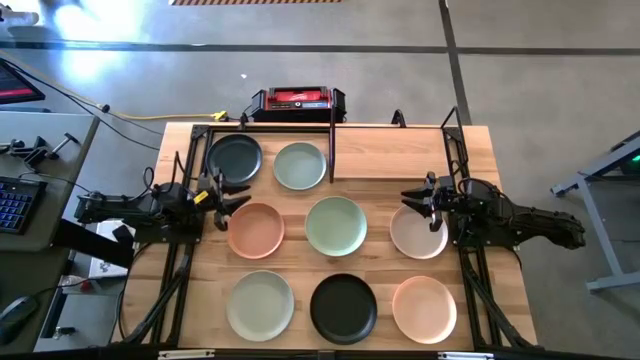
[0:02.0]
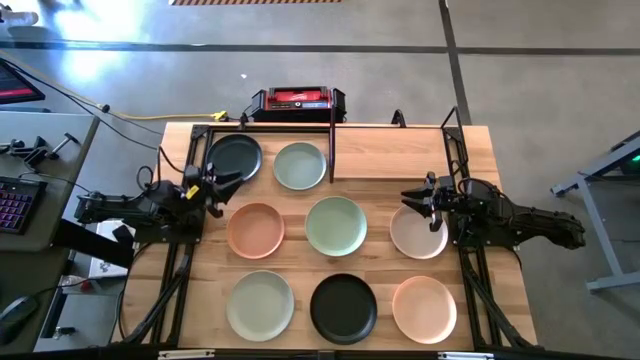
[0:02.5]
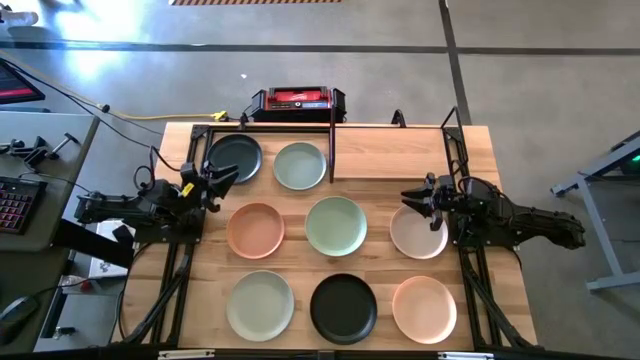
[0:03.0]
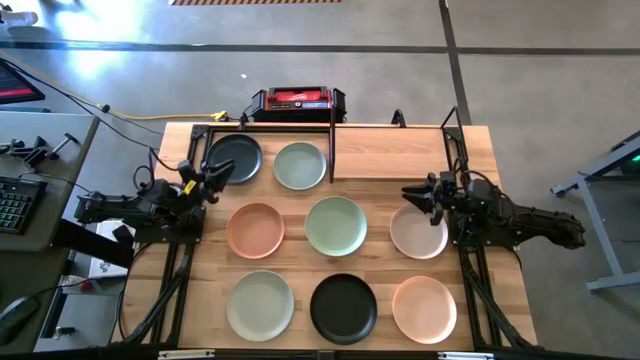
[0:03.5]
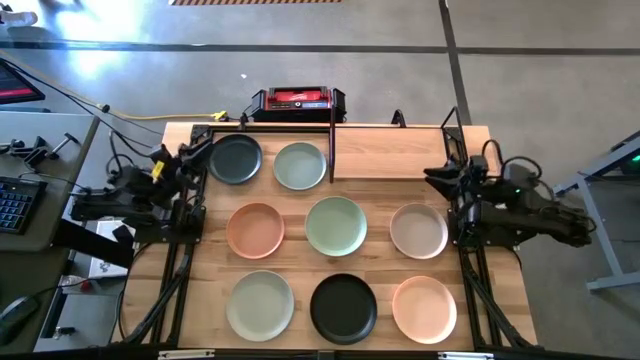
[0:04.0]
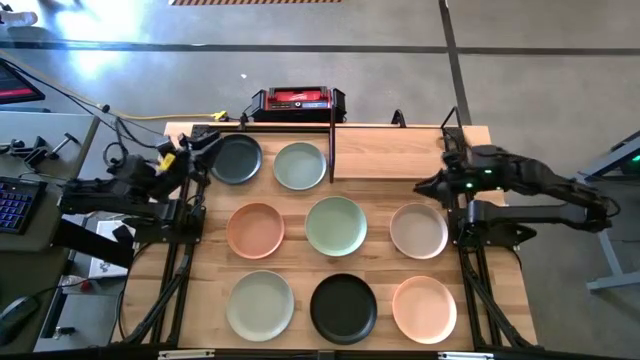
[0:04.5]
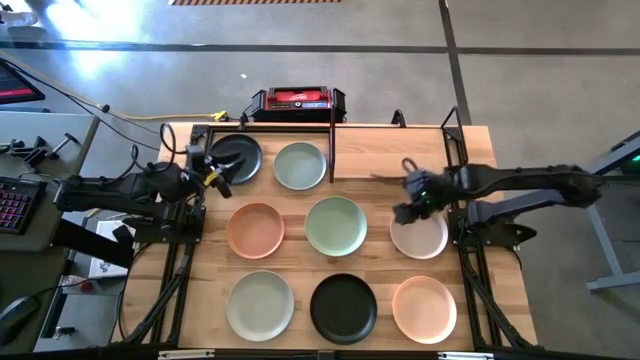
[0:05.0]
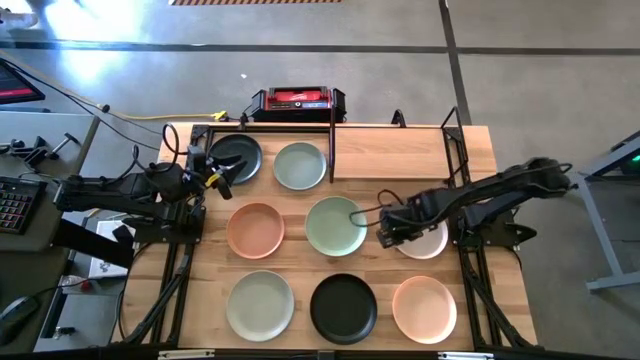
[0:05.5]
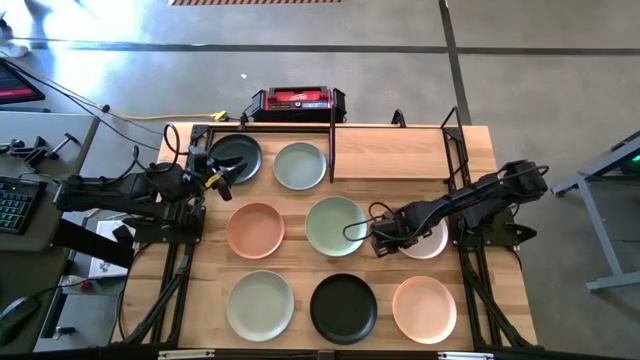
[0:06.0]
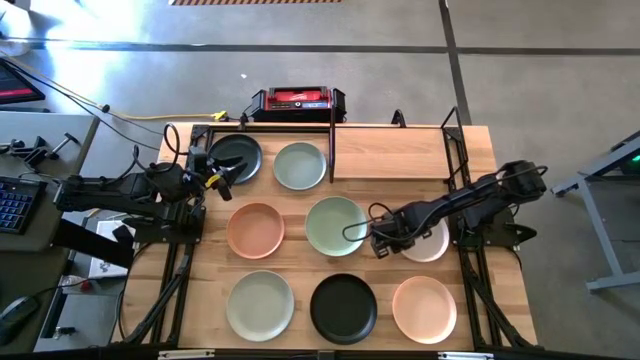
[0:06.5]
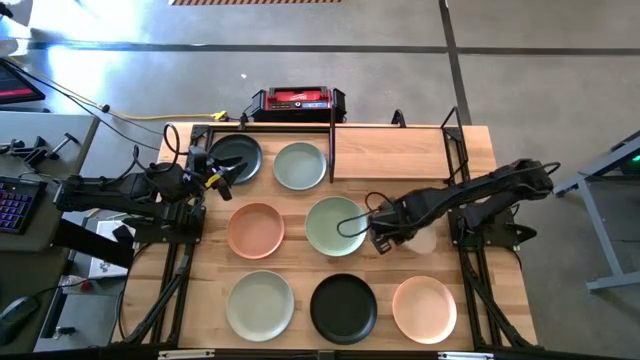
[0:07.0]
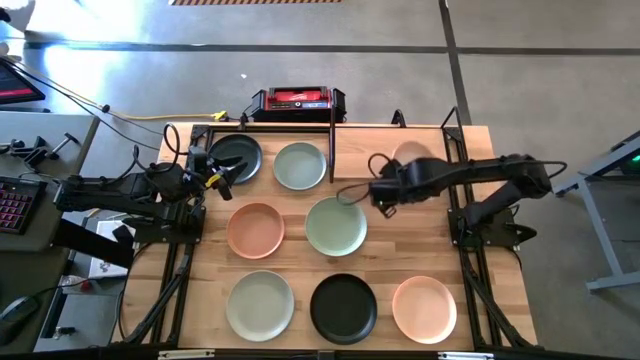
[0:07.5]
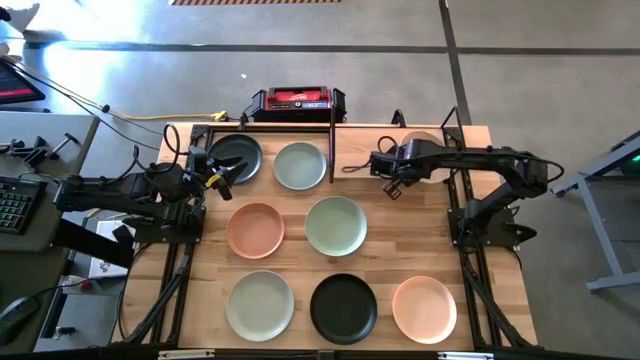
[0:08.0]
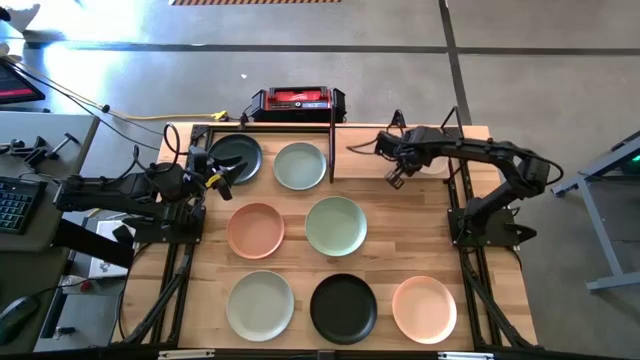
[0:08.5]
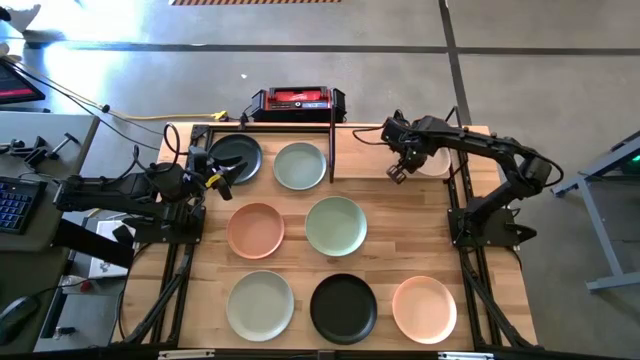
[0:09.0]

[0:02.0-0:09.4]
Task: Place and stack plates onto a shelf
Put the dirty white plate on the shelf

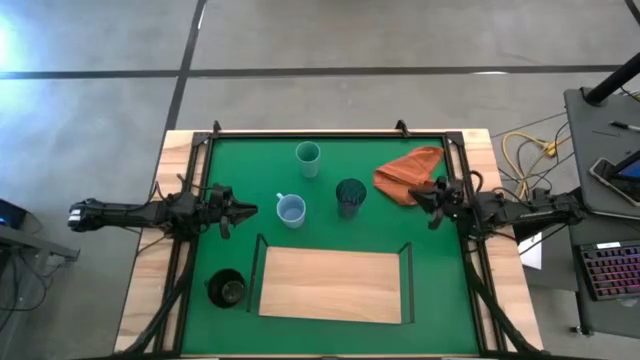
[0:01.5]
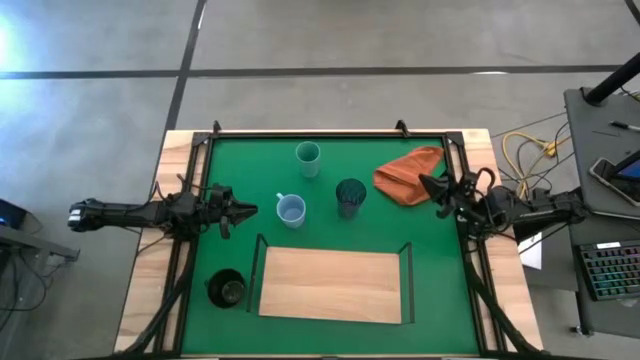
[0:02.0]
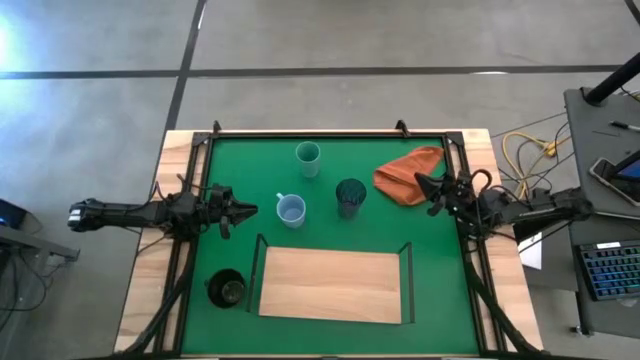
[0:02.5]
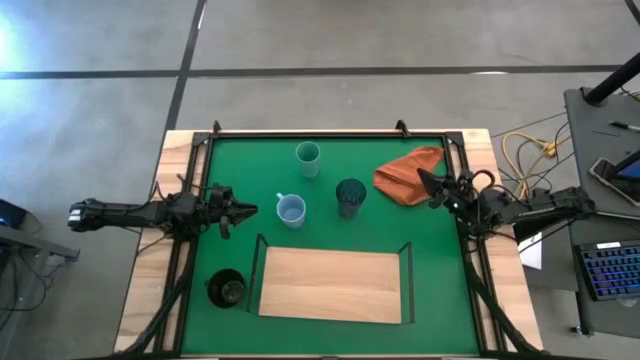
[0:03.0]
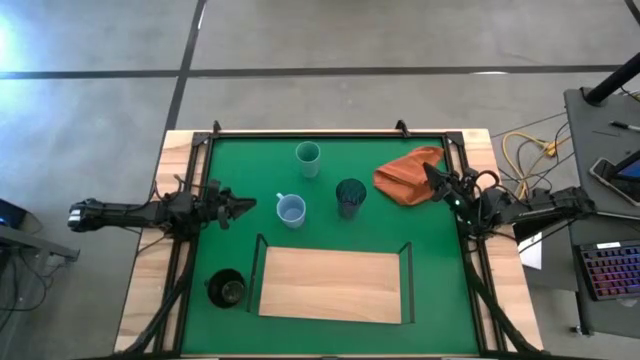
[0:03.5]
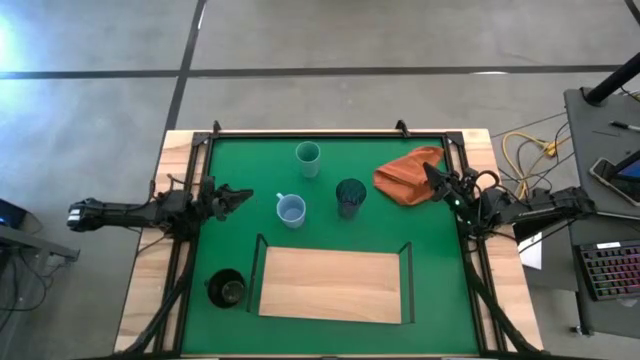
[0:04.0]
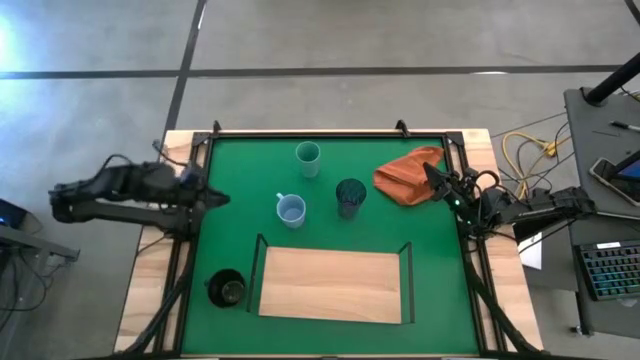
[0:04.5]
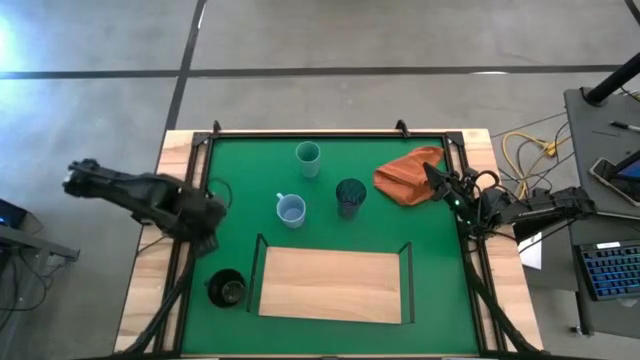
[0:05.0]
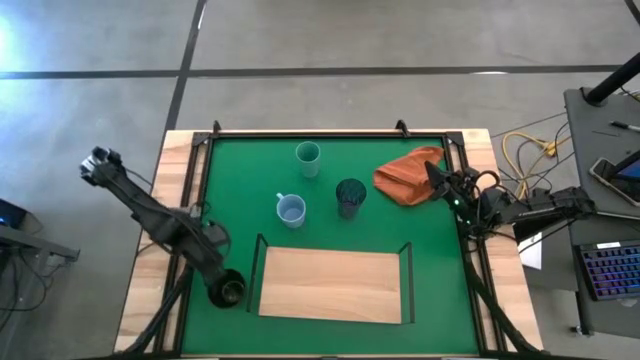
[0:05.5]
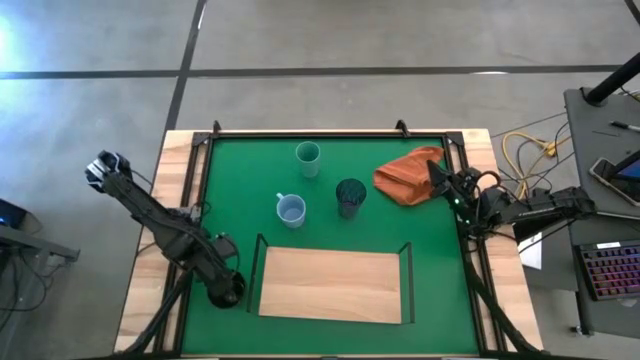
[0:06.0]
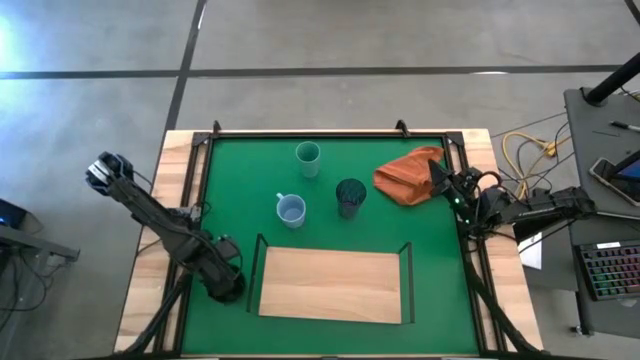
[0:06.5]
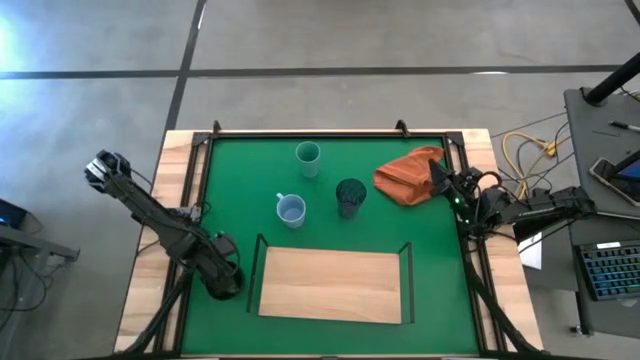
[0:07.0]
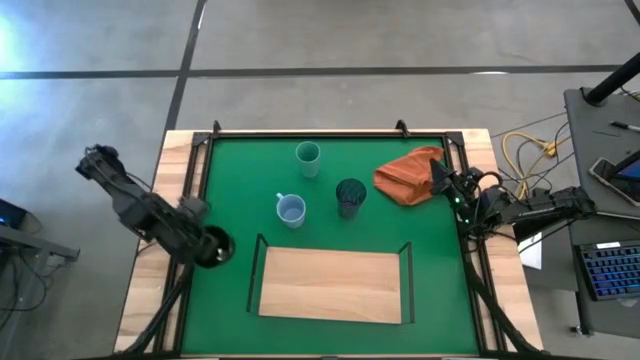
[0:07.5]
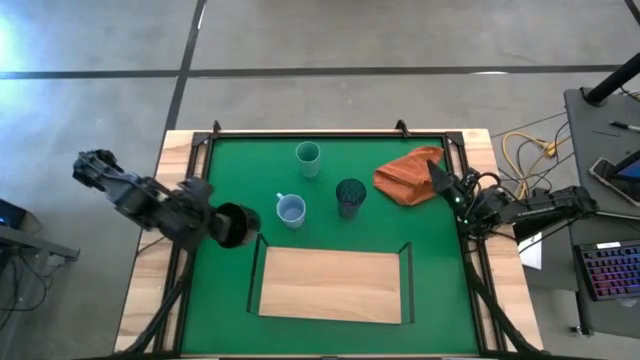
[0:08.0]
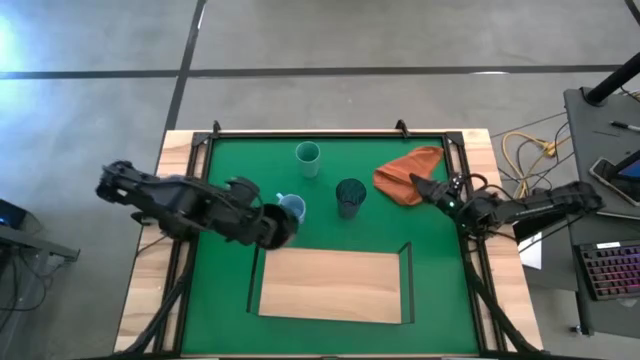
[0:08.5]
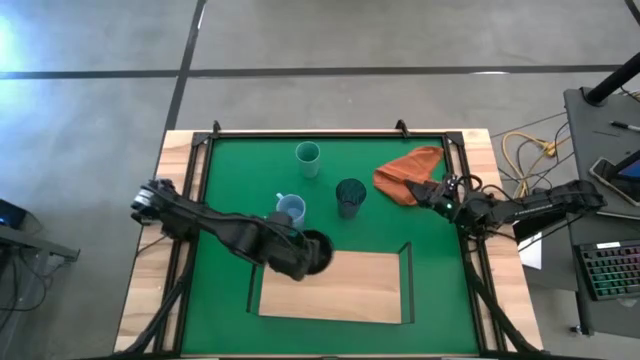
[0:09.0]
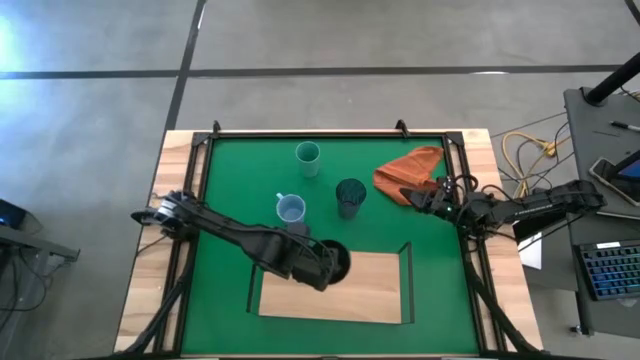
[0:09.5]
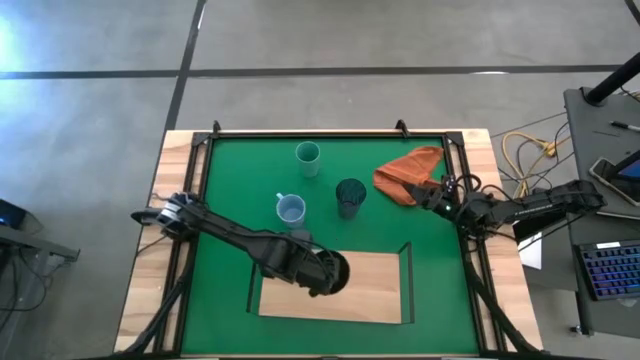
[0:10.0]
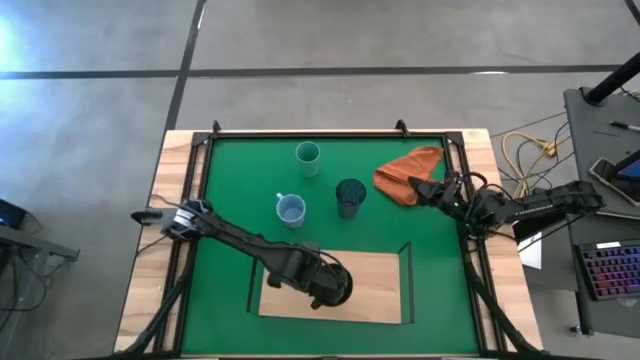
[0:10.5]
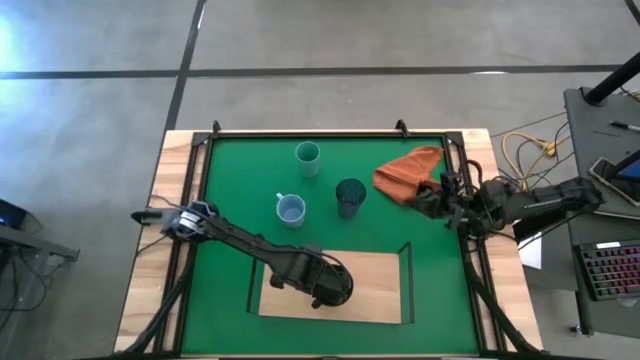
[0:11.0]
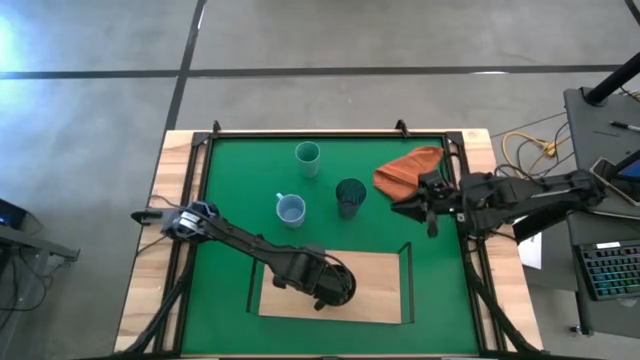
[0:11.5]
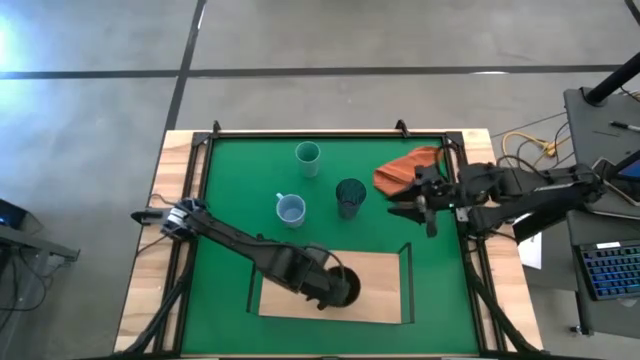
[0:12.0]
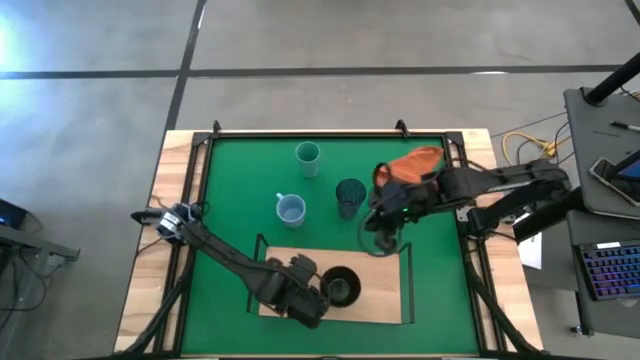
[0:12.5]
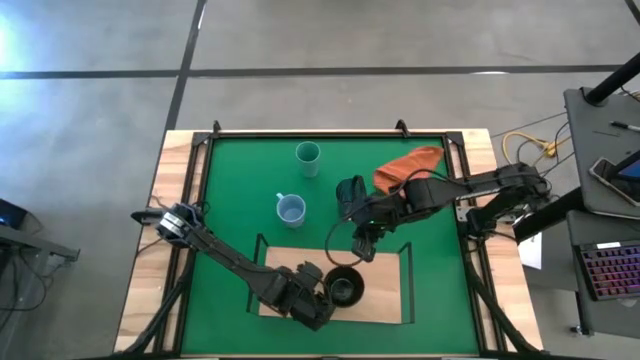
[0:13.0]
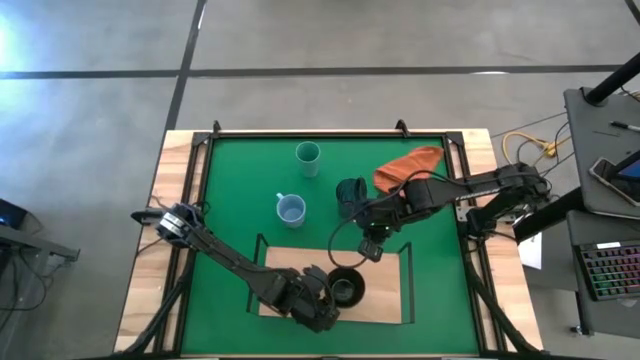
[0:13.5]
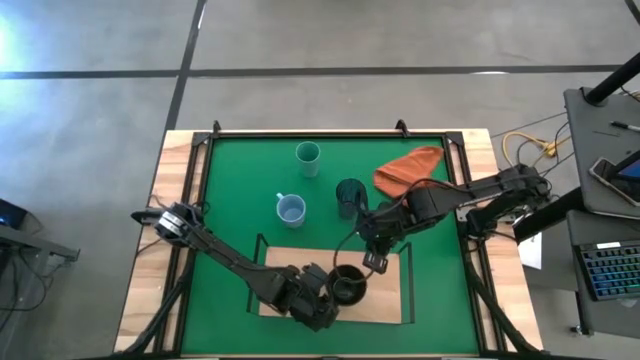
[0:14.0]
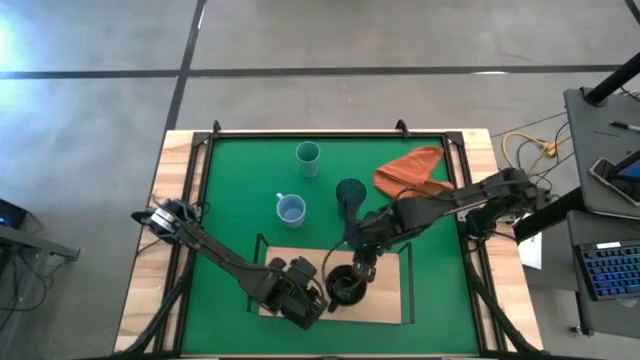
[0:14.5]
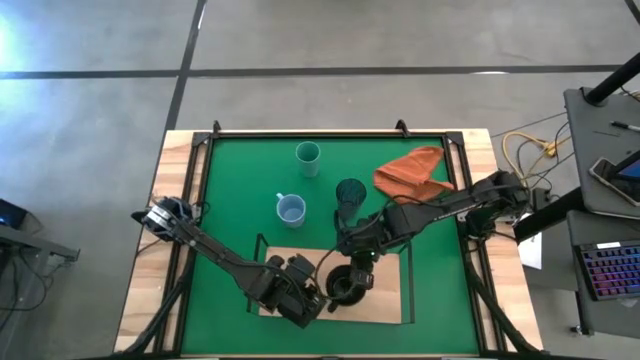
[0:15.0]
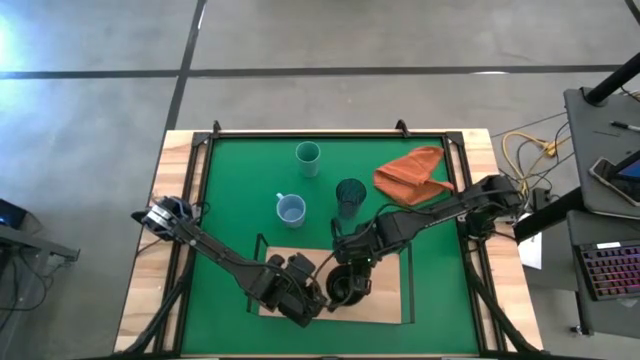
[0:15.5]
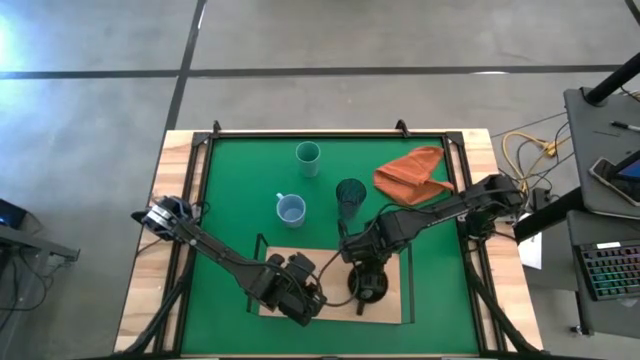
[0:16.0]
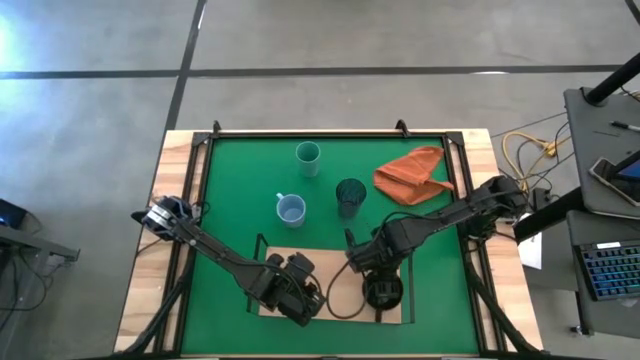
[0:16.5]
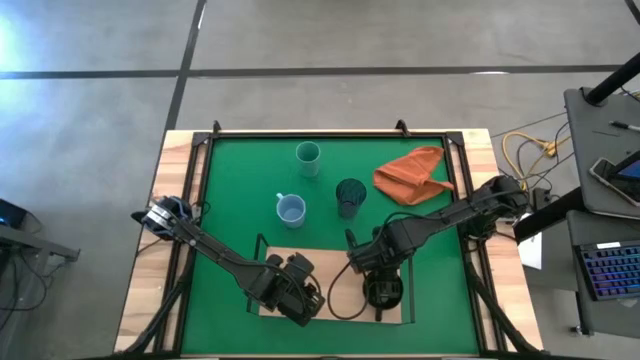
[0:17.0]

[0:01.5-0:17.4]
Task: Stack small to large cups/mugs on shelf
Put the black mug on the shelf
